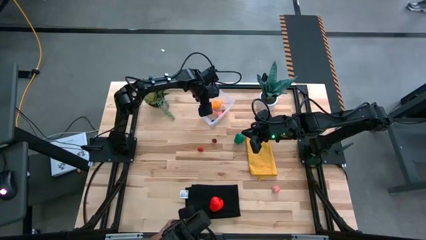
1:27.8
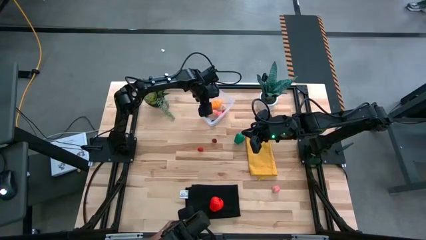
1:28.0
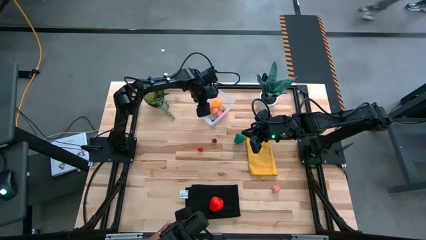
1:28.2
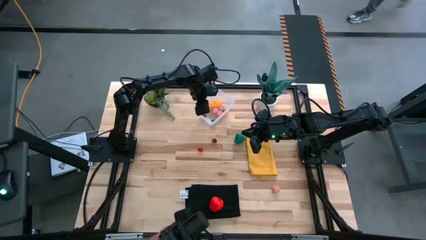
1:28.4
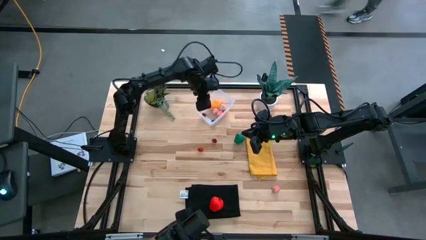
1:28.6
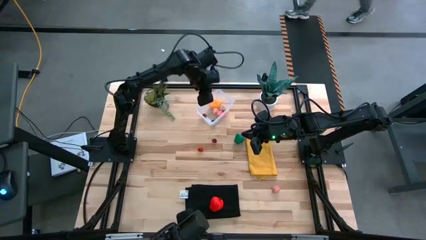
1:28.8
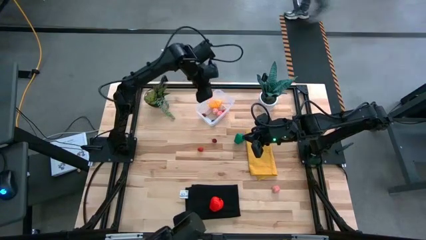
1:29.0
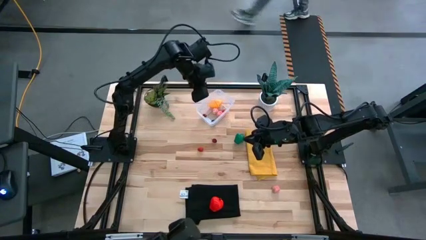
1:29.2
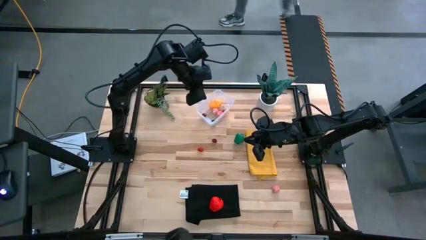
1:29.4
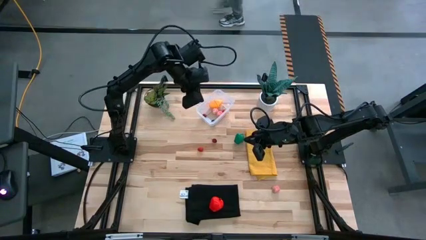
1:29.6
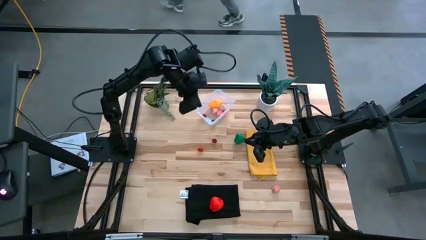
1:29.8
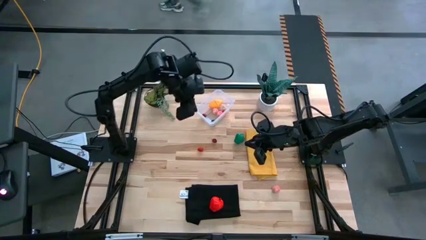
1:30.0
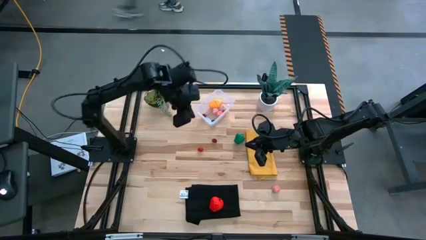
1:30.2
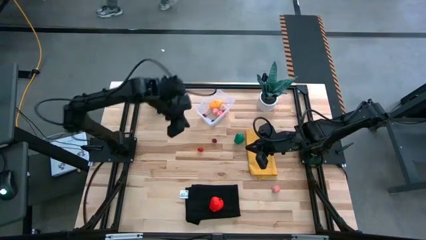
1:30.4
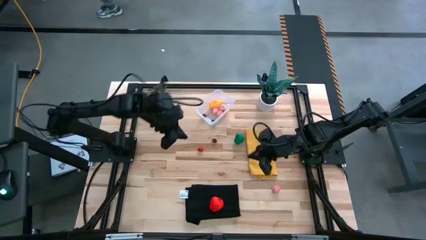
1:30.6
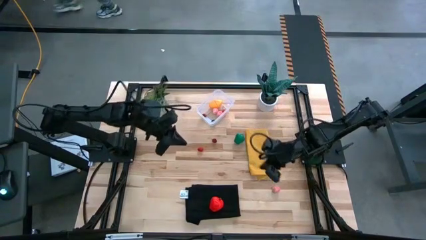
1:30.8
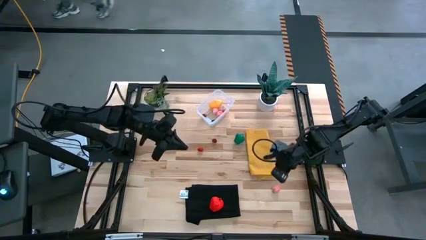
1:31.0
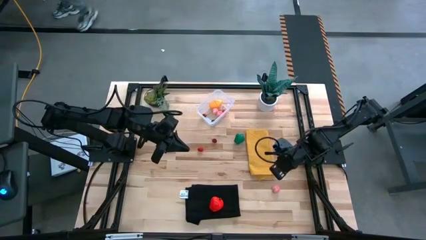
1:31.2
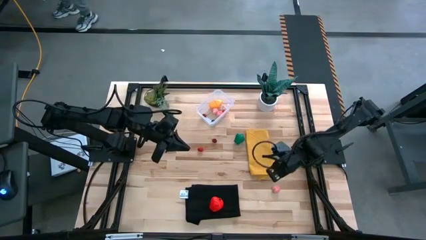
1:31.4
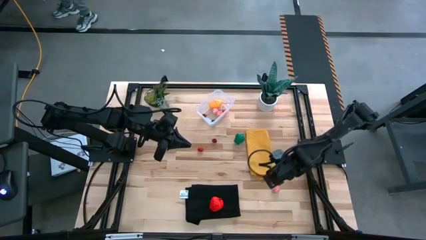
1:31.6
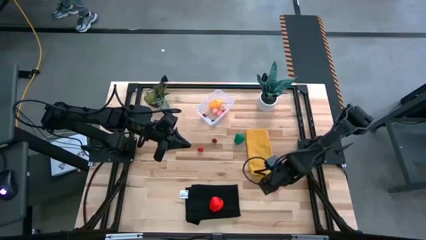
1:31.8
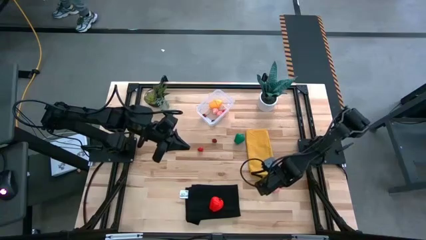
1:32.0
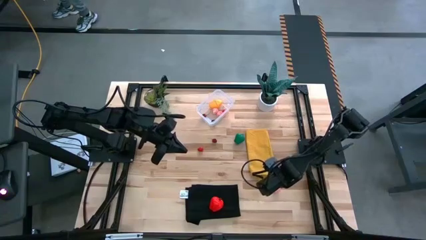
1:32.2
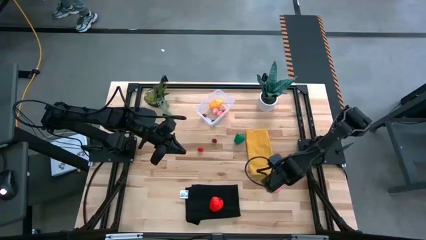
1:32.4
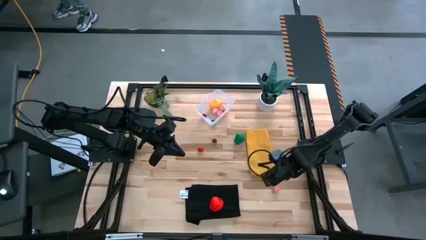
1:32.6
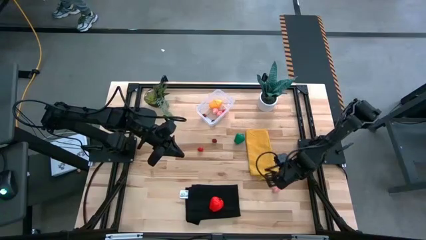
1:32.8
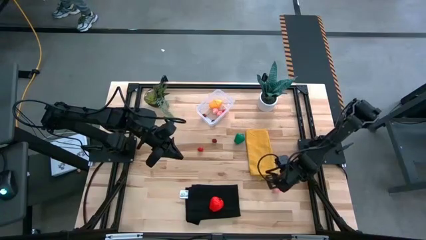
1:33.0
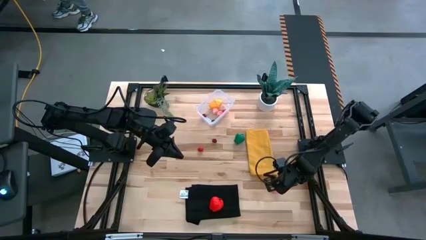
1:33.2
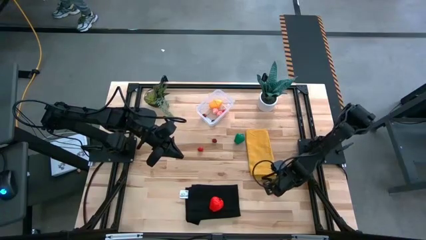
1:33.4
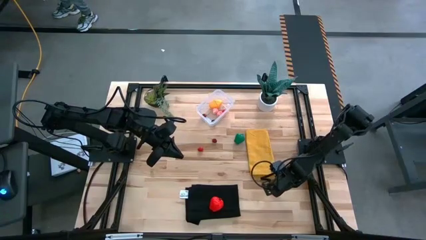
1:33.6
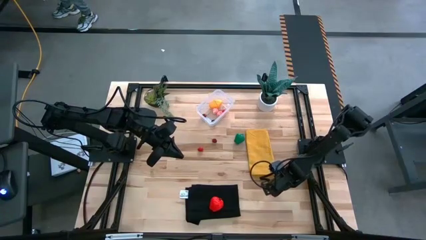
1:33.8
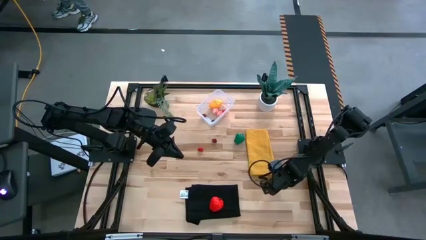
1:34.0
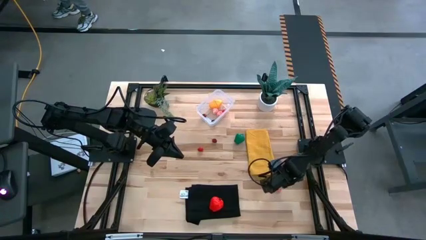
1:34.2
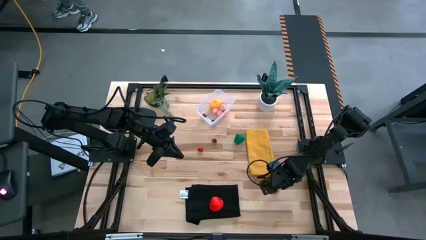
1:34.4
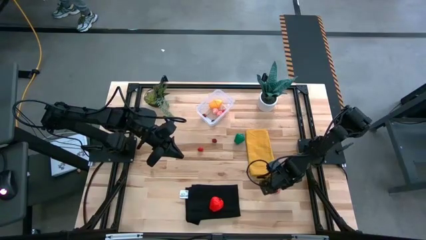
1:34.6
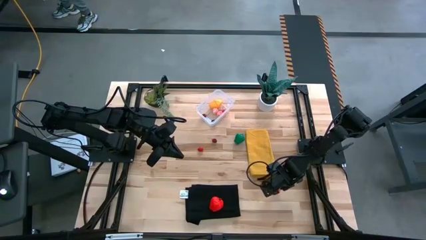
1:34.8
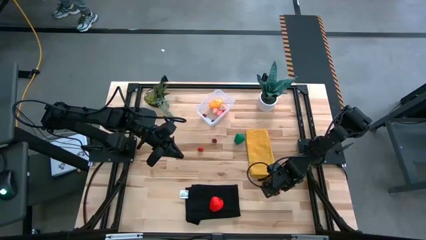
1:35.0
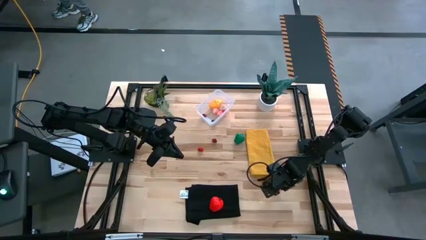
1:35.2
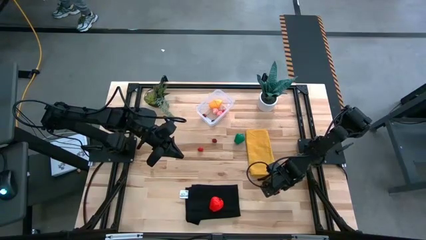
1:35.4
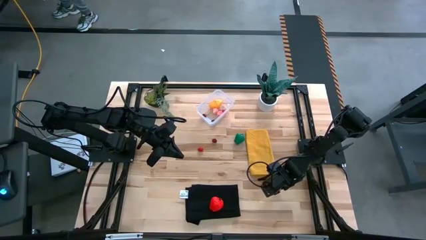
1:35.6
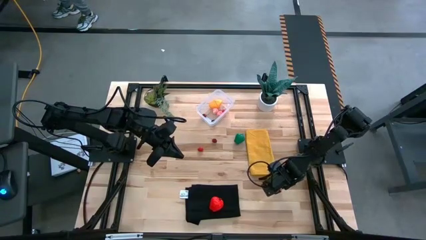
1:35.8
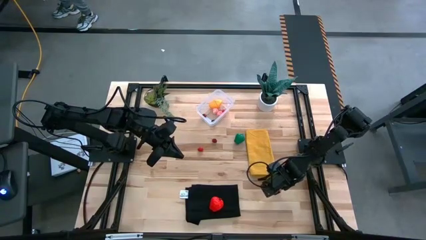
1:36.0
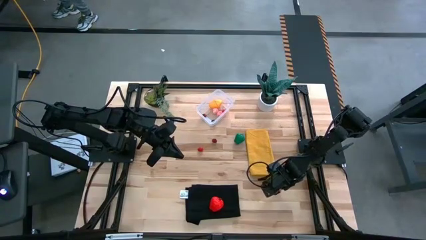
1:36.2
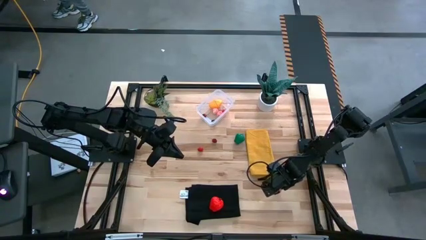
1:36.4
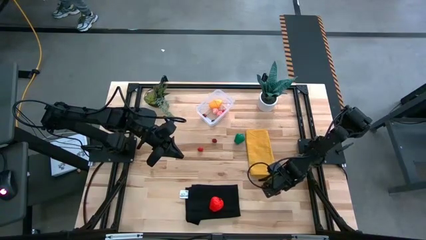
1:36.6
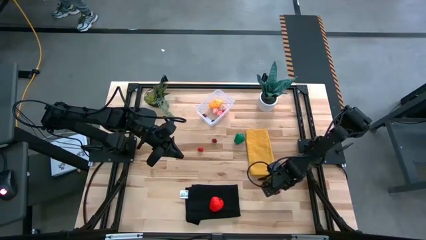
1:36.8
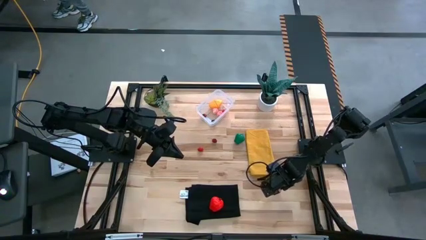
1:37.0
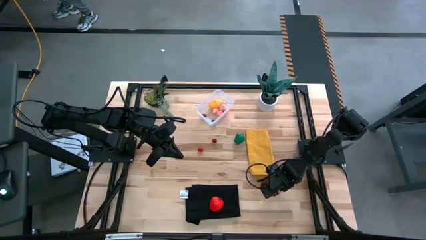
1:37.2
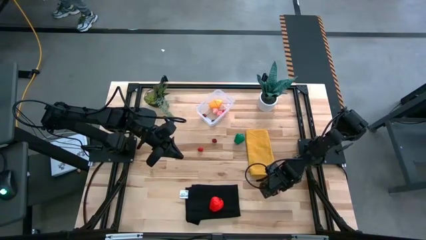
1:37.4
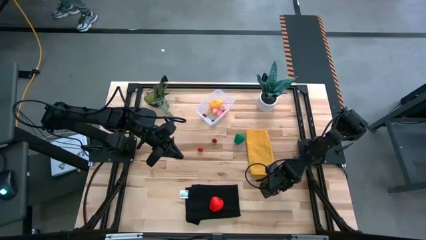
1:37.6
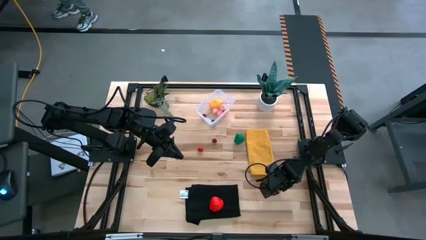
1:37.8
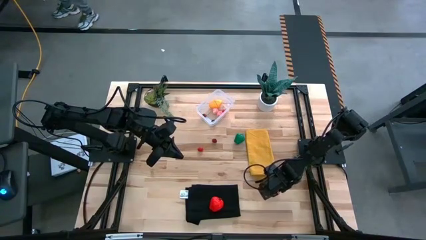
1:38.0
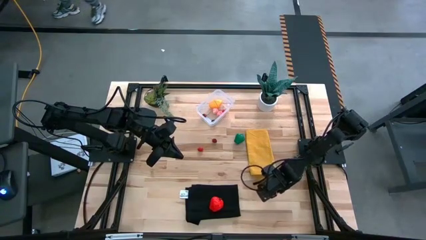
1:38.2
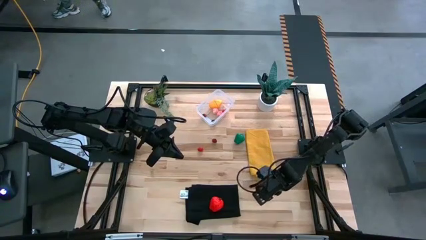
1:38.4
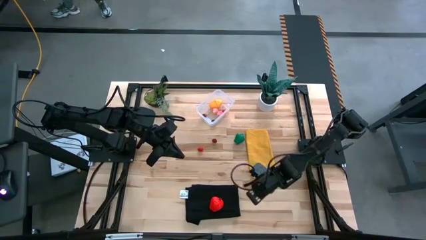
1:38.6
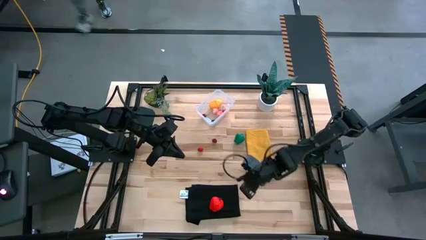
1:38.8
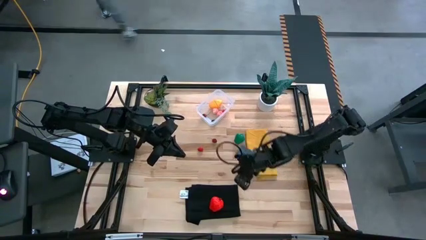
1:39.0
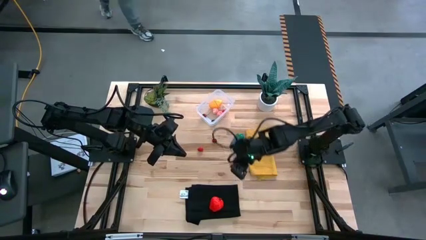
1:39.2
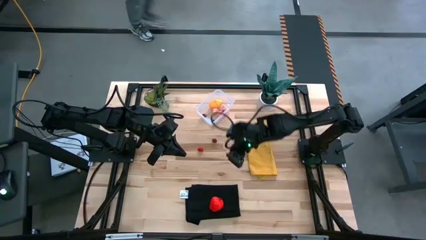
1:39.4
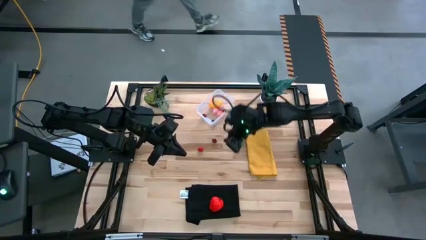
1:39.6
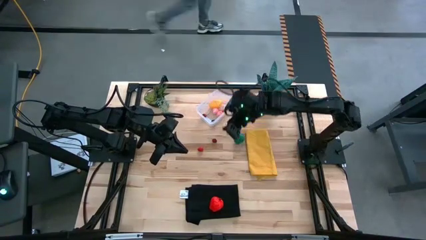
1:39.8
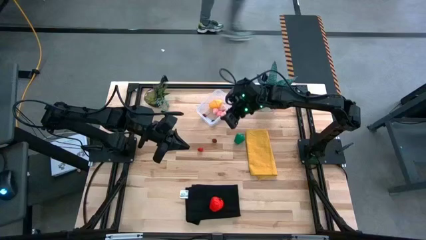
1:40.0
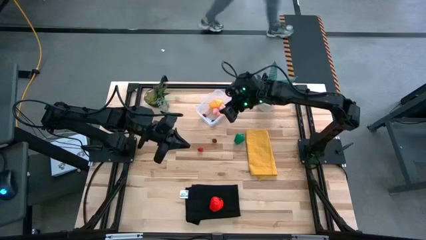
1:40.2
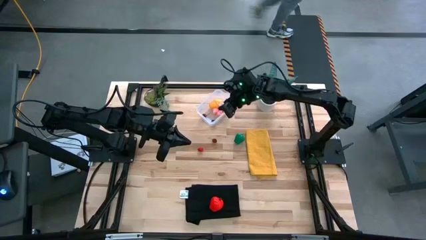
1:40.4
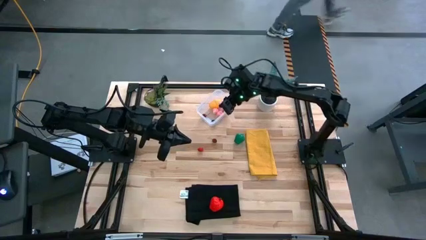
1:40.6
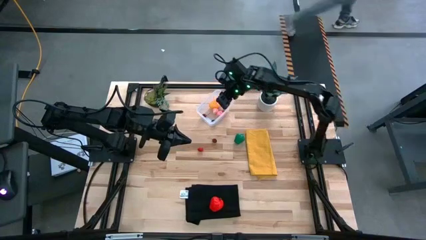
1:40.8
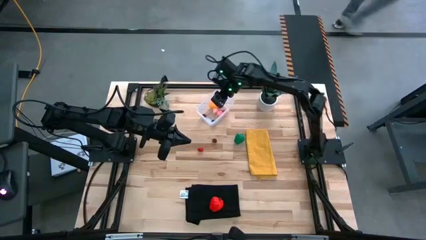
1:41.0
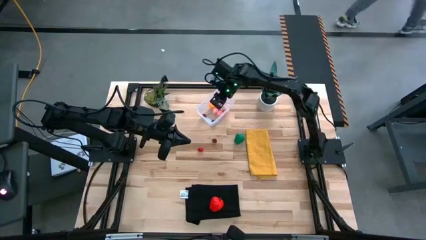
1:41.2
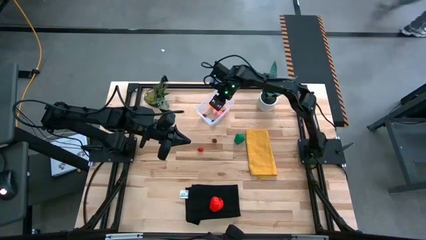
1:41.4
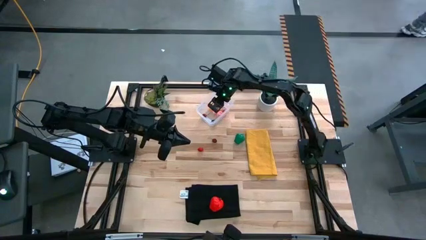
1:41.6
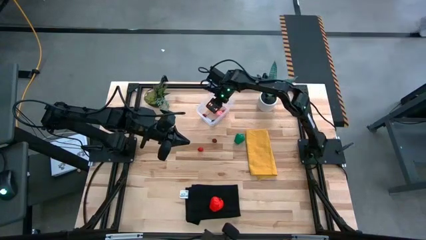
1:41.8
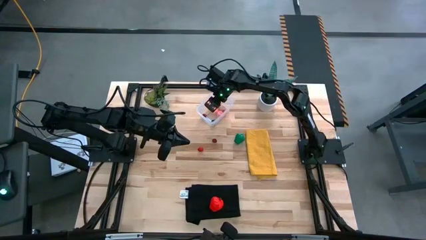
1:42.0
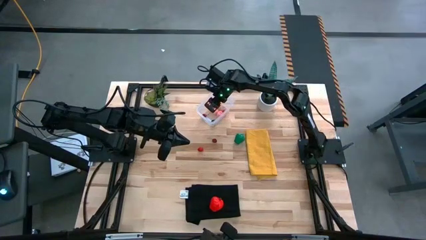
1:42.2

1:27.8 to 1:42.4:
Task: Pick and placing Produce into tupperware
Put the pink peach into the transparent bin
